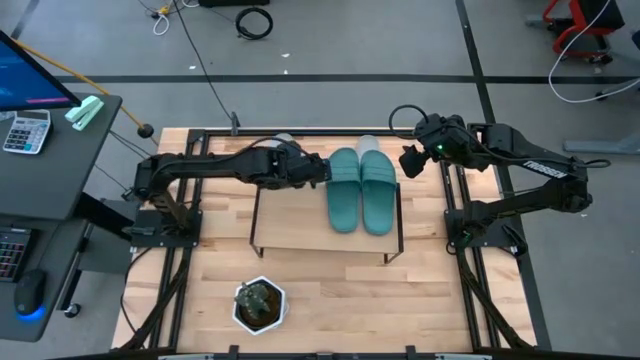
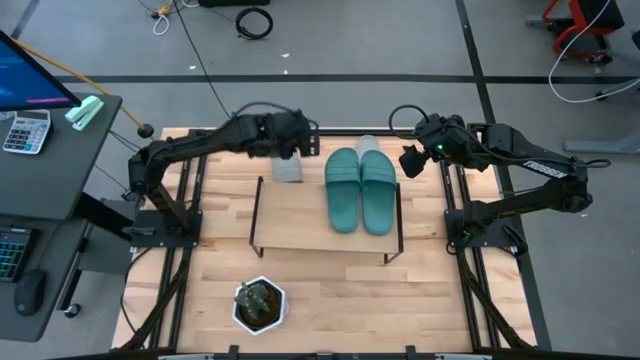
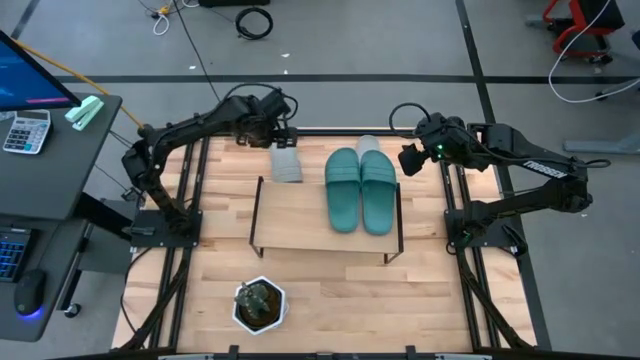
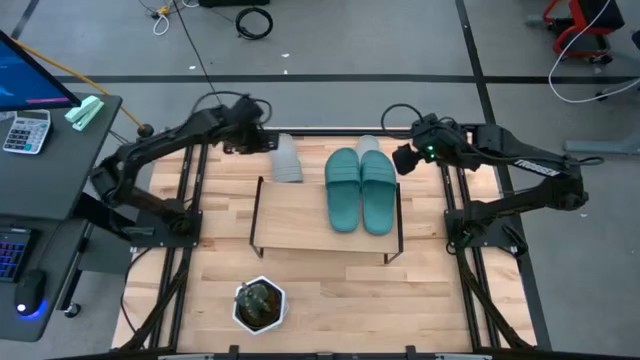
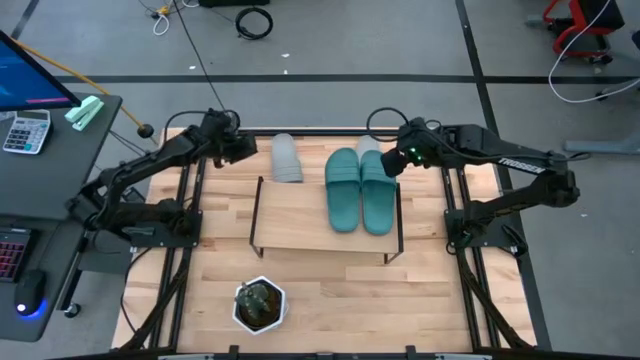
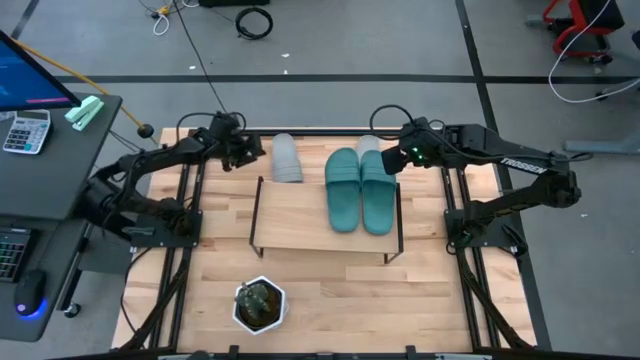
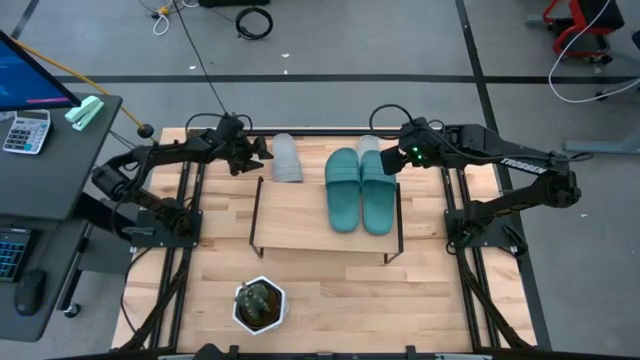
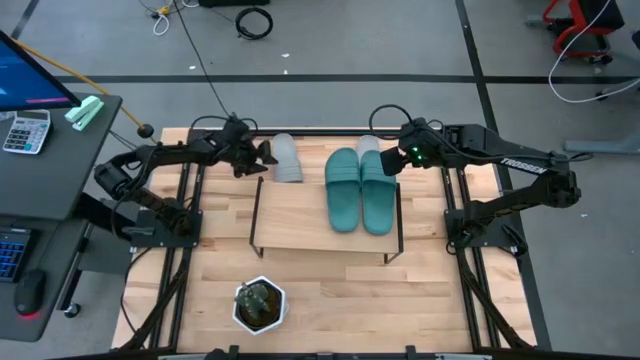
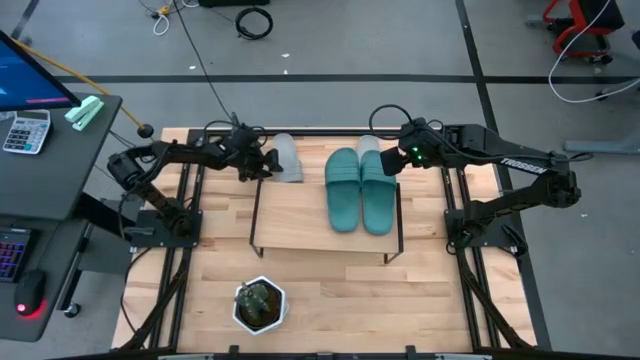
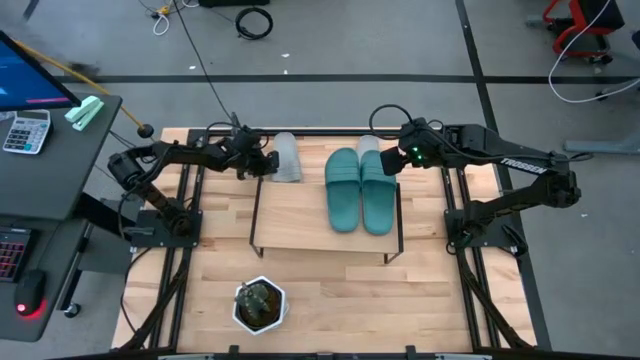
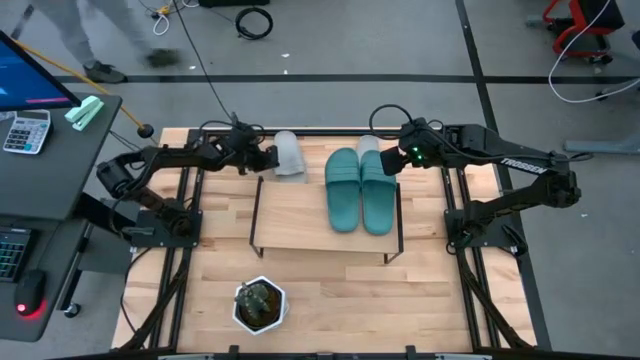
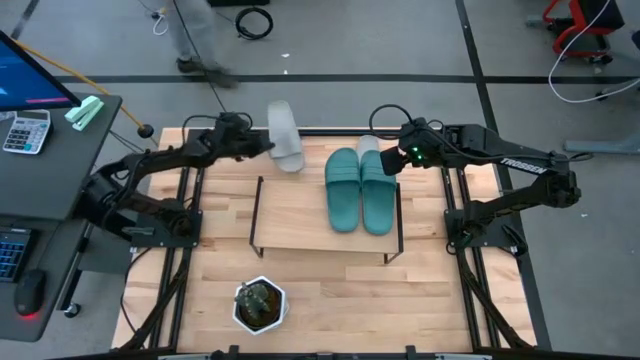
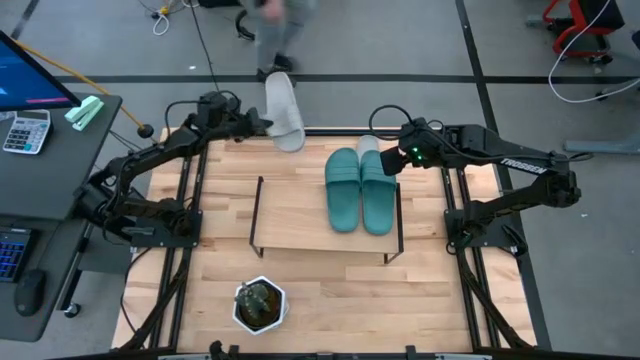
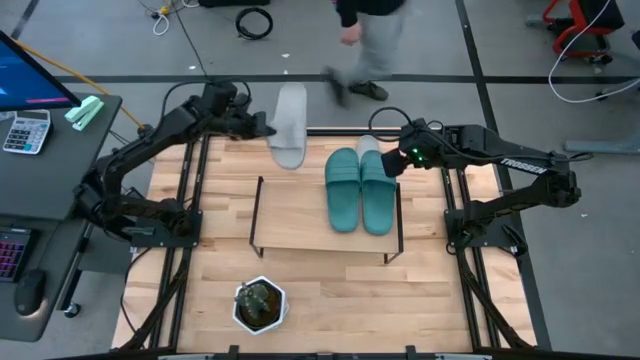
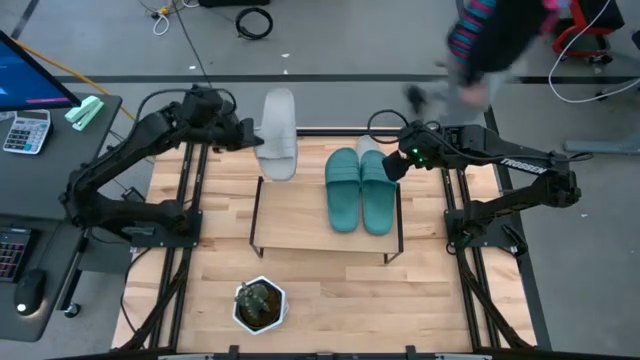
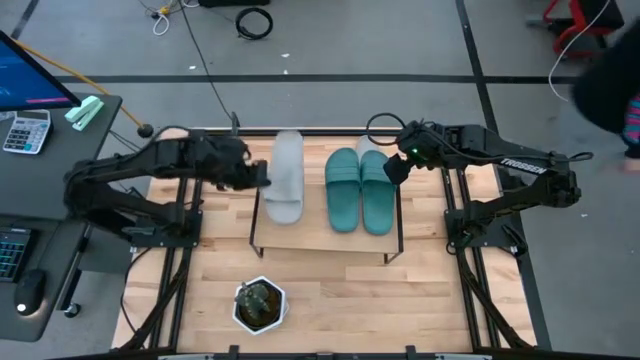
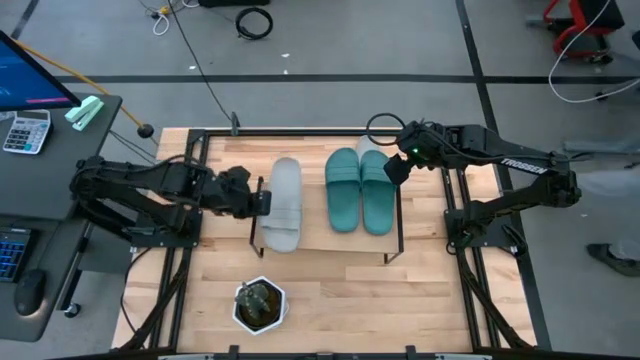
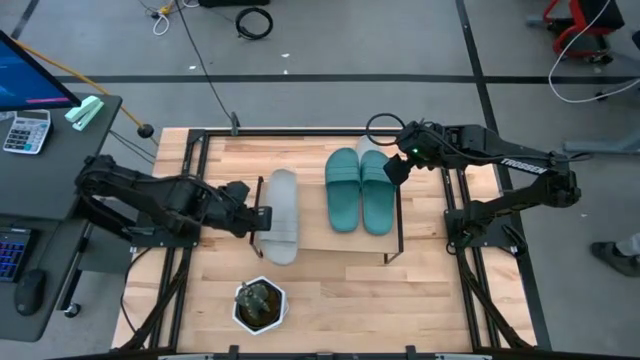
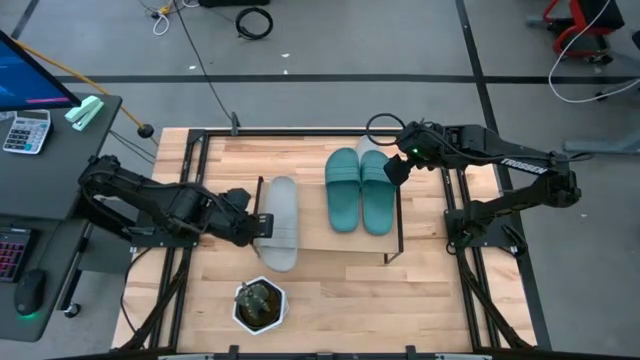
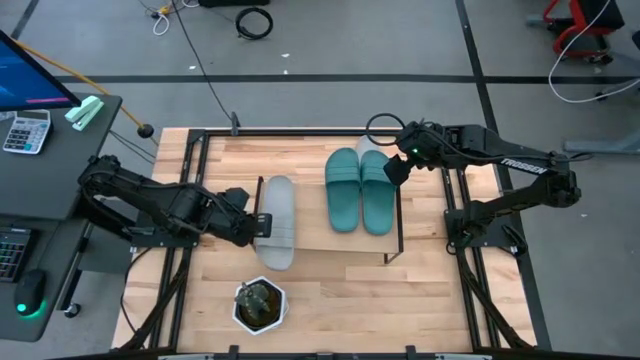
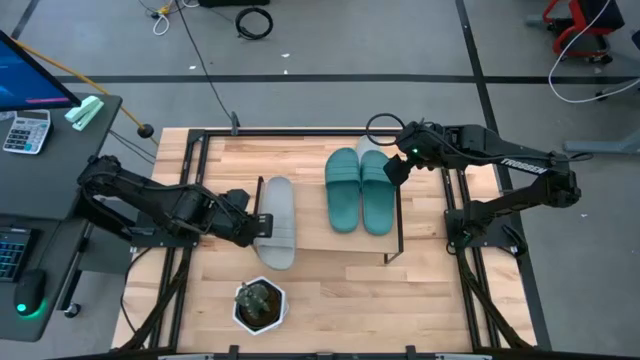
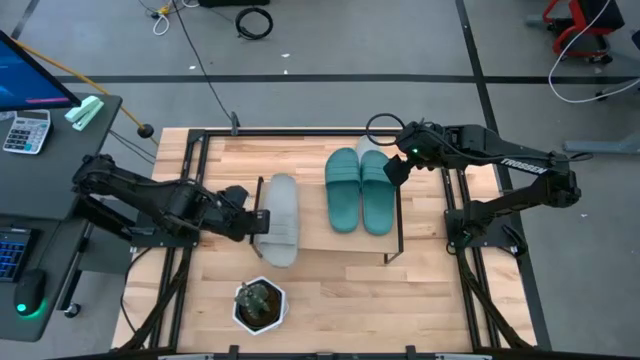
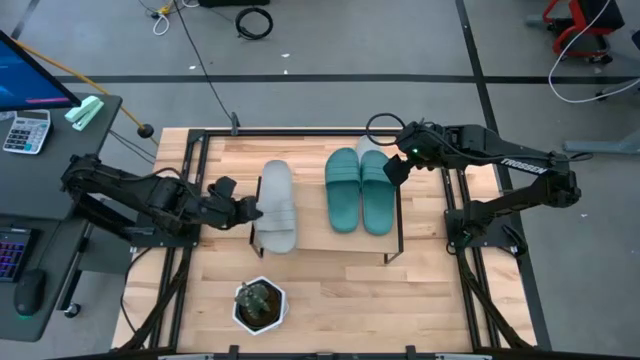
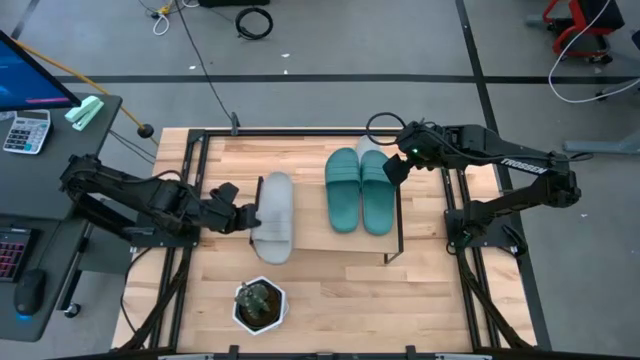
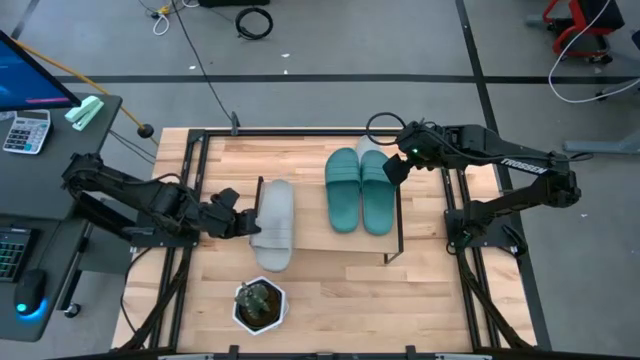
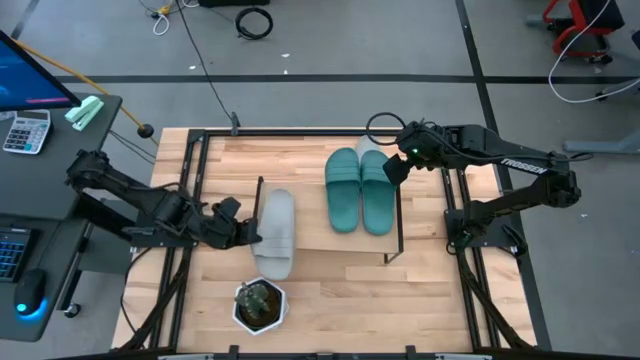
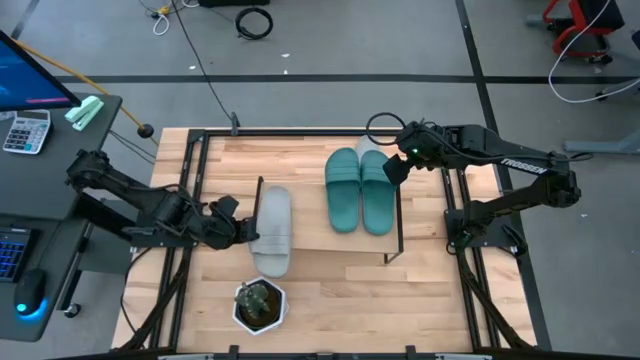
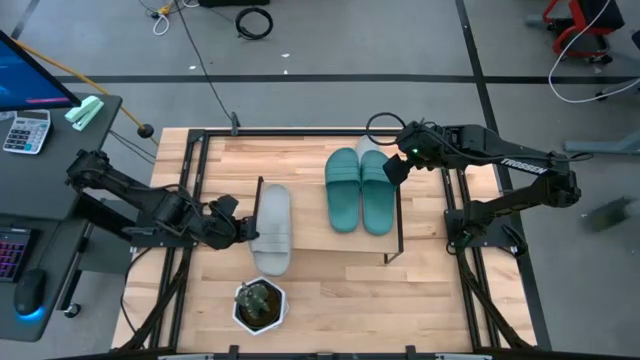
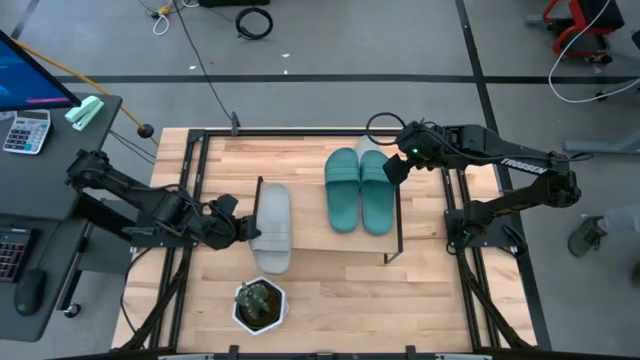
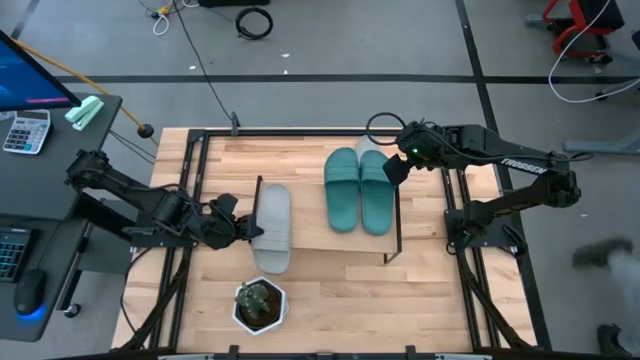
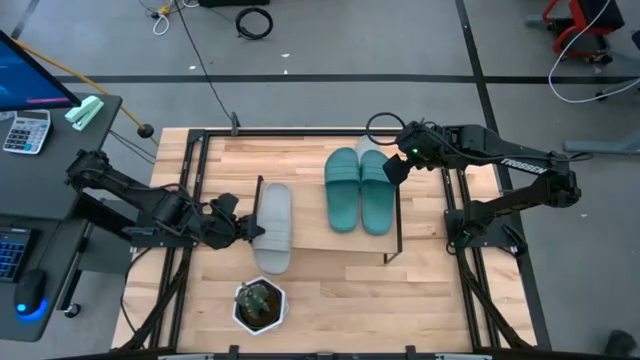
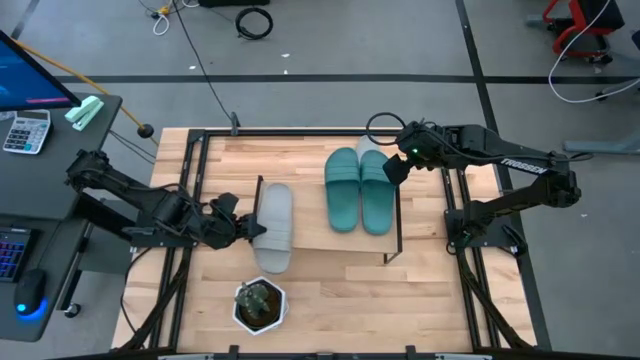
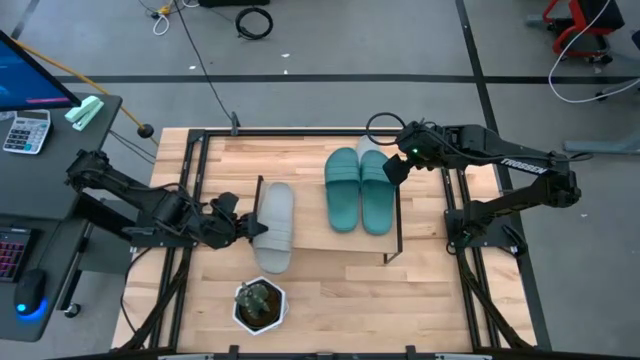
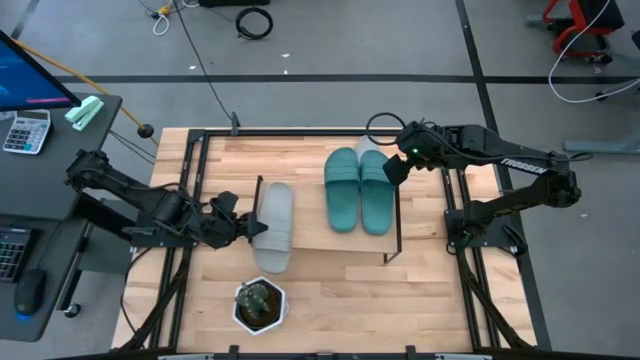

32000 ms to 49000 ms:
Task: Pick and place slides into the shelf
Put the left gray slide on the shelf

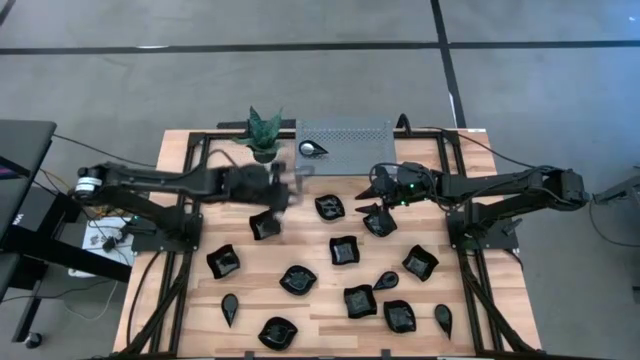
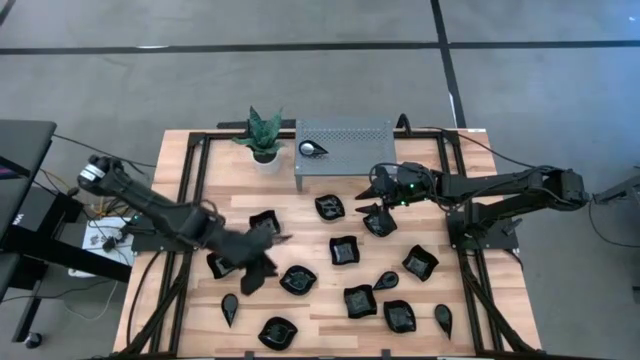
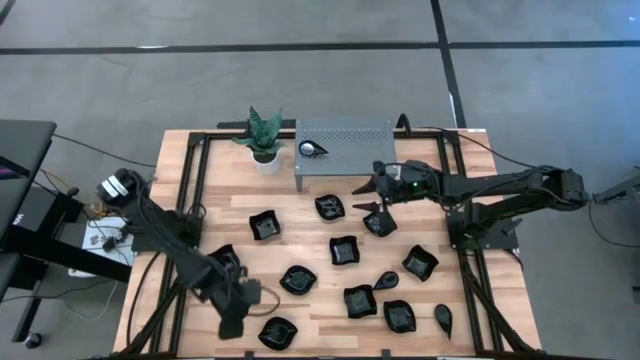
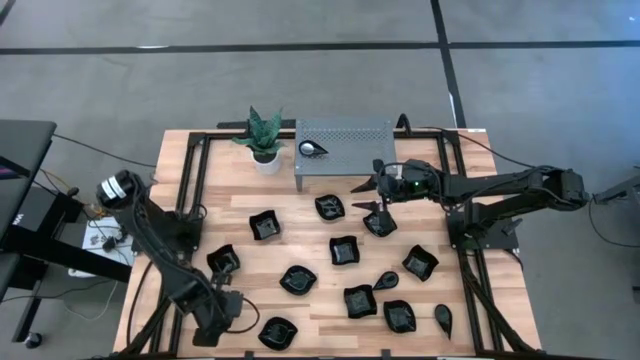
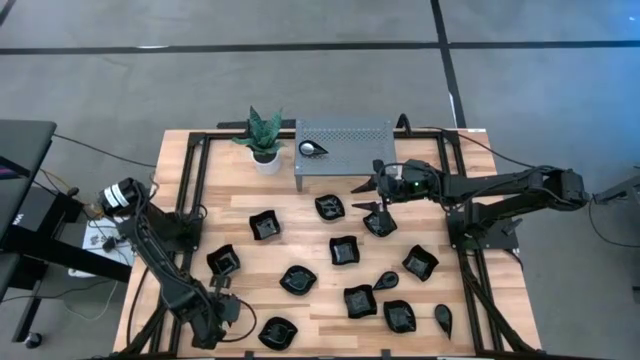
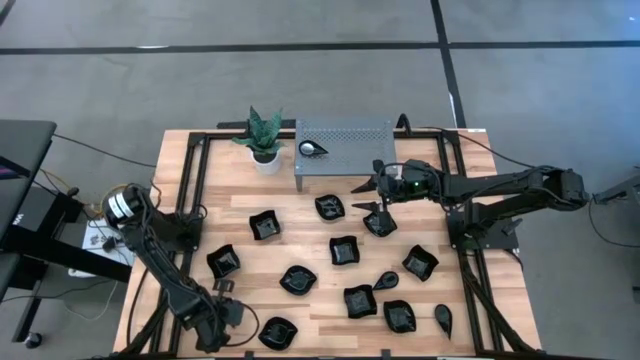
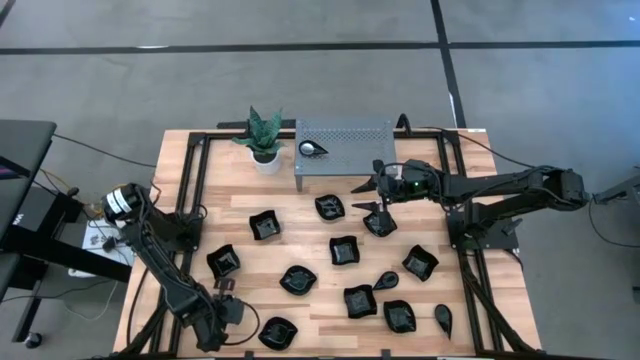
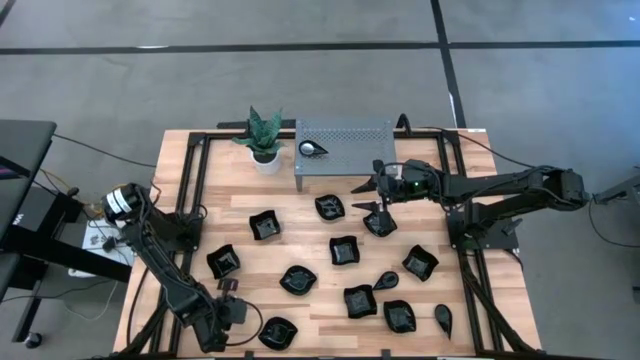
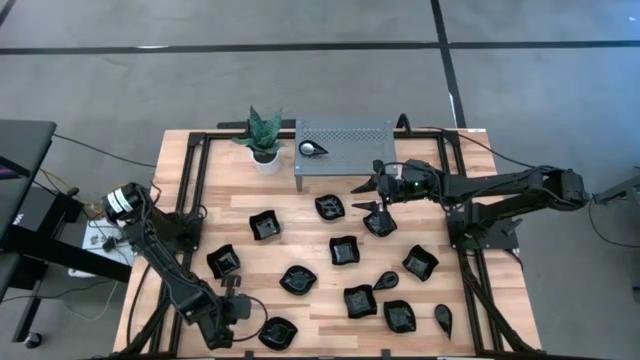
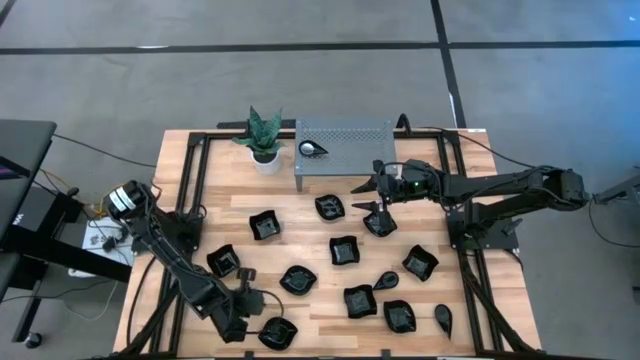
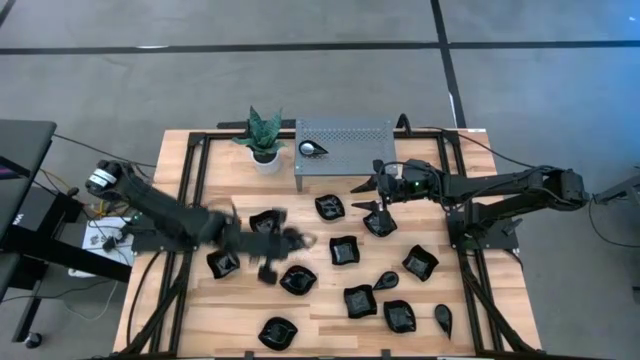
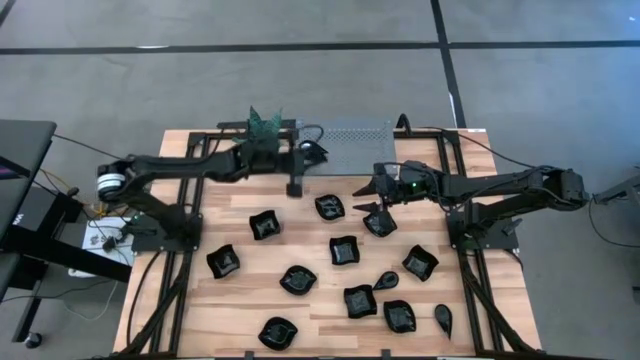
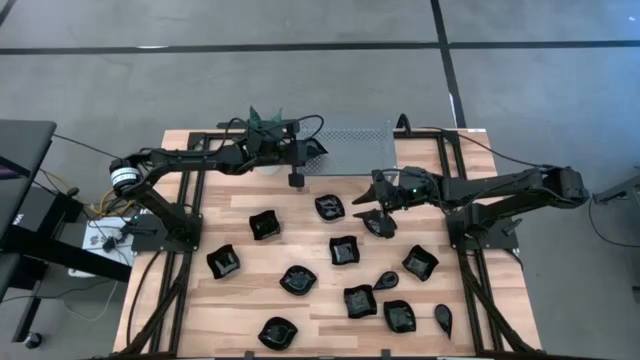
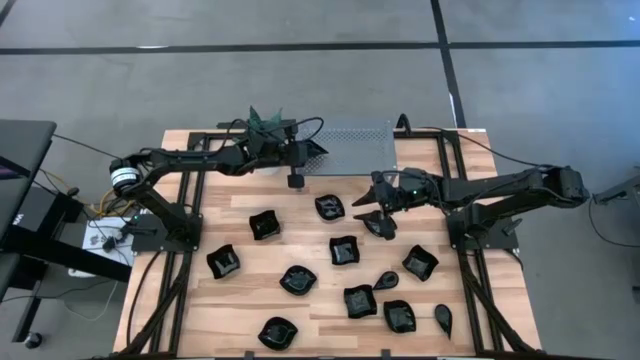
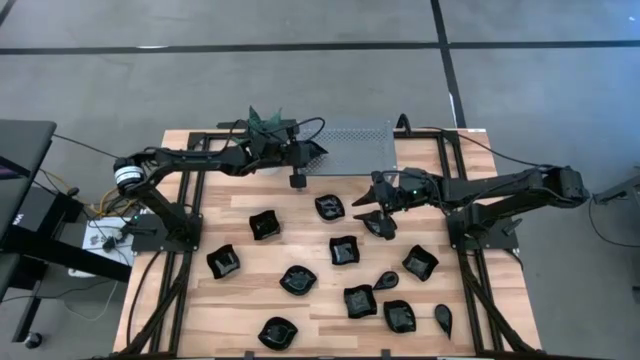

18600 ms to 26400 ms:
Task: Pick & Place Mini shaped plates
Stack the left drop-shaped plate on top of the drop-shaped plate on the shelf
